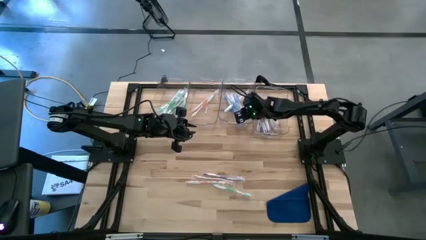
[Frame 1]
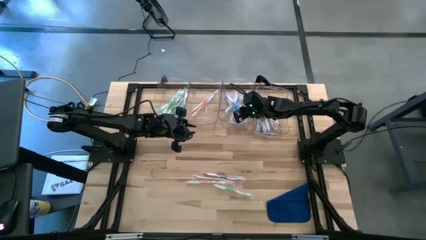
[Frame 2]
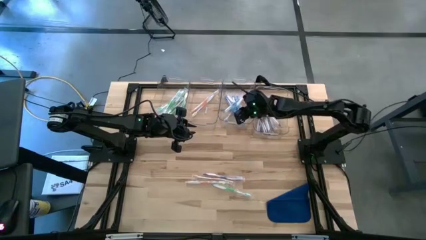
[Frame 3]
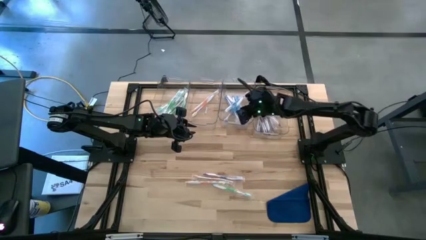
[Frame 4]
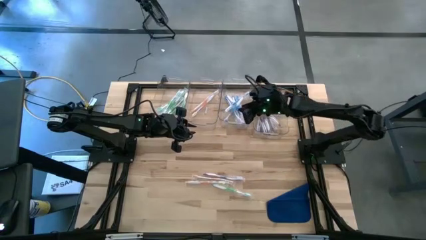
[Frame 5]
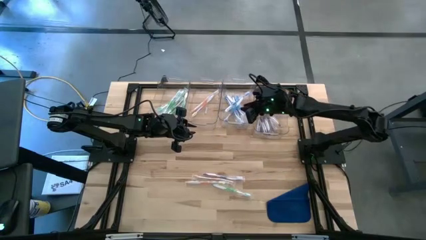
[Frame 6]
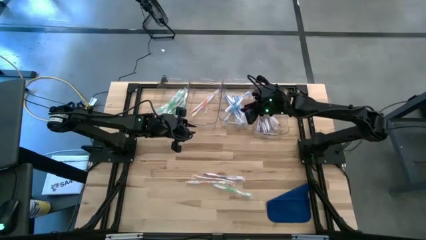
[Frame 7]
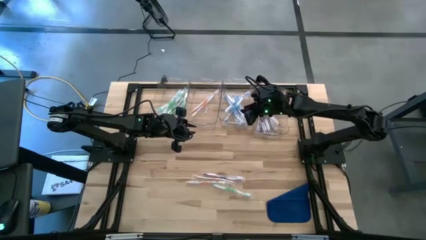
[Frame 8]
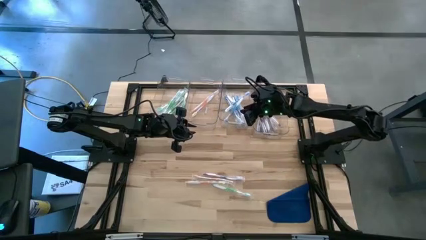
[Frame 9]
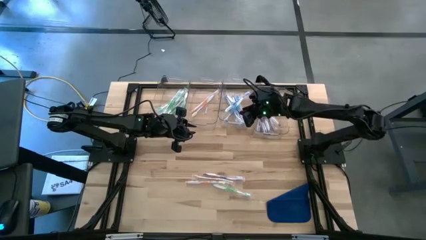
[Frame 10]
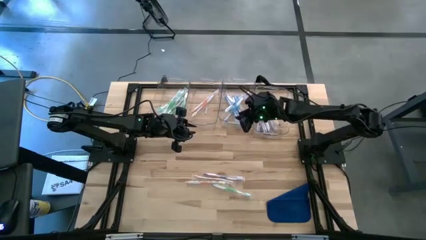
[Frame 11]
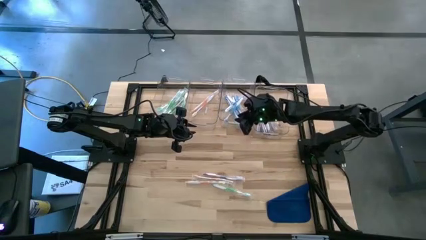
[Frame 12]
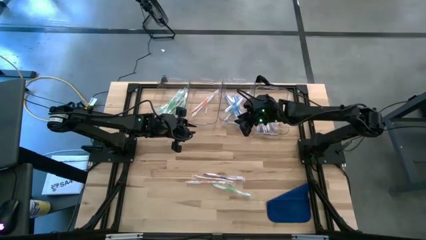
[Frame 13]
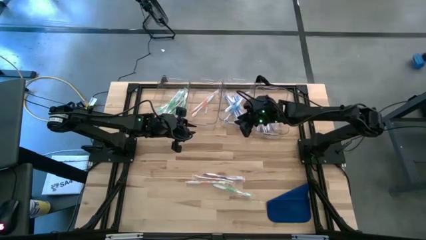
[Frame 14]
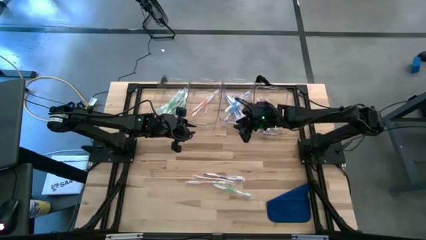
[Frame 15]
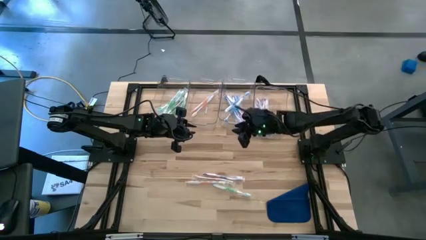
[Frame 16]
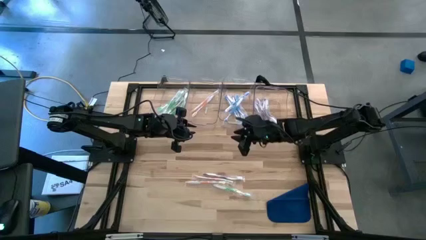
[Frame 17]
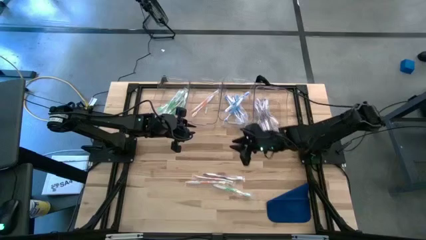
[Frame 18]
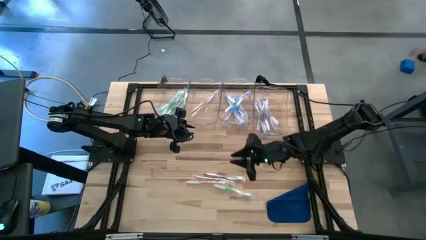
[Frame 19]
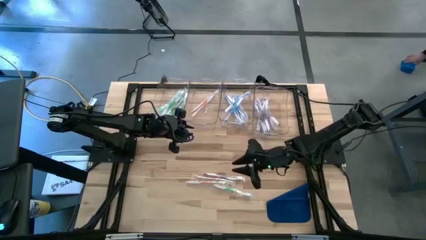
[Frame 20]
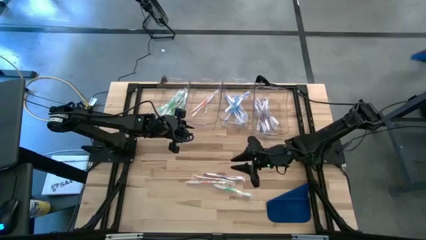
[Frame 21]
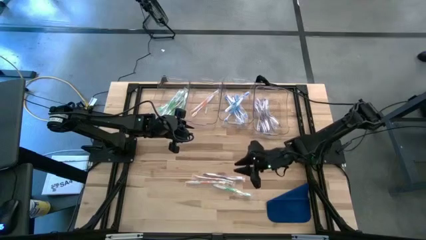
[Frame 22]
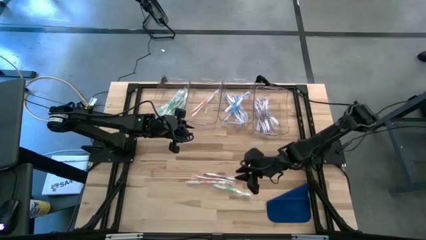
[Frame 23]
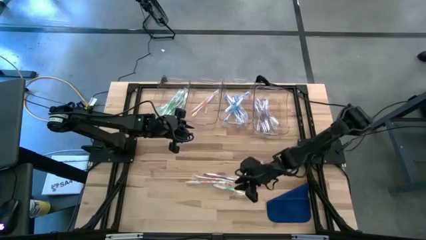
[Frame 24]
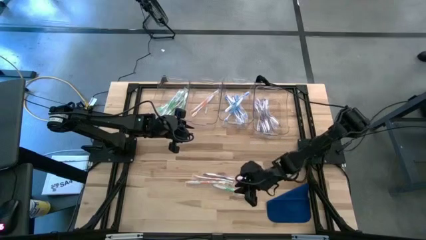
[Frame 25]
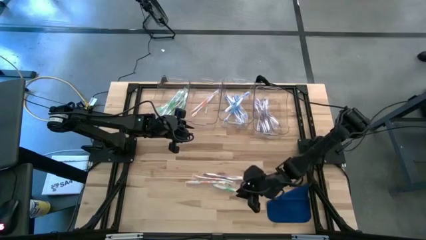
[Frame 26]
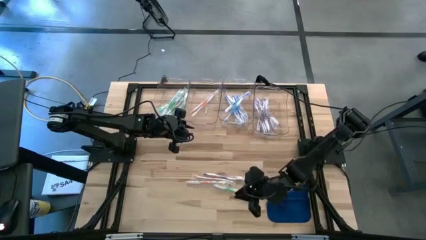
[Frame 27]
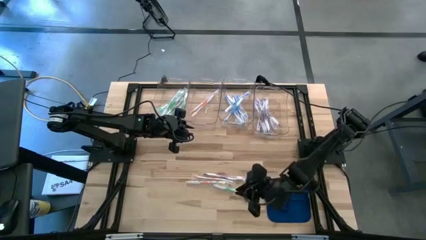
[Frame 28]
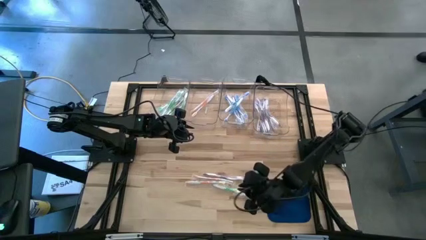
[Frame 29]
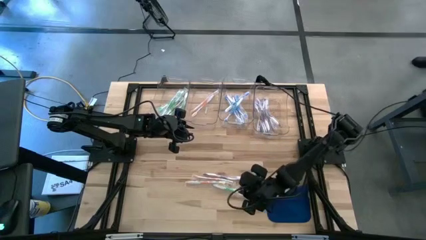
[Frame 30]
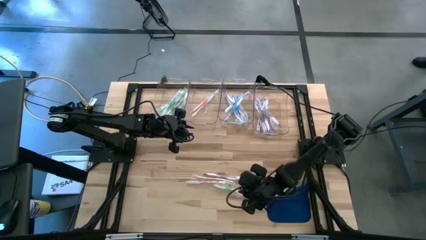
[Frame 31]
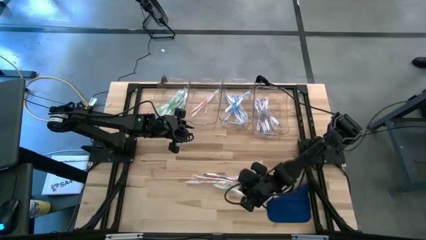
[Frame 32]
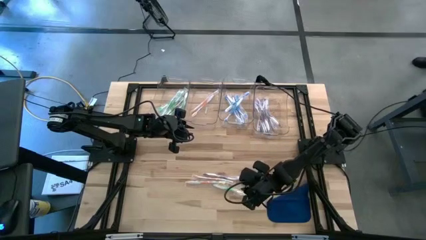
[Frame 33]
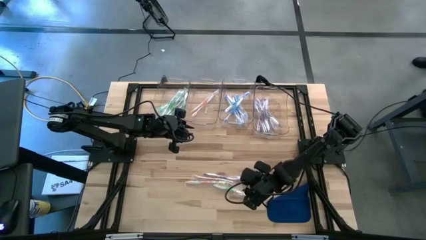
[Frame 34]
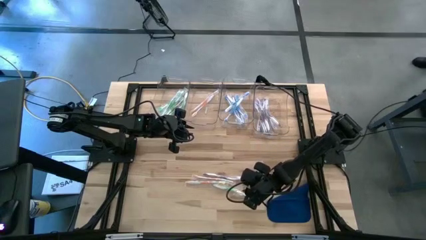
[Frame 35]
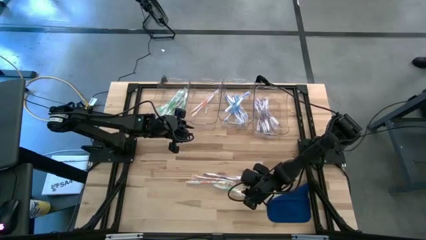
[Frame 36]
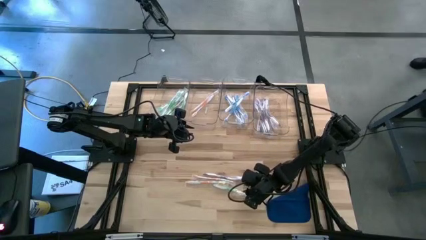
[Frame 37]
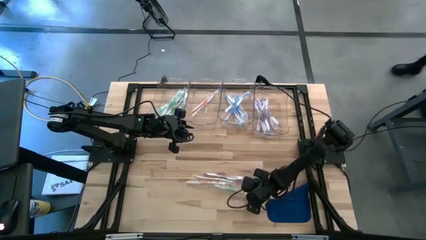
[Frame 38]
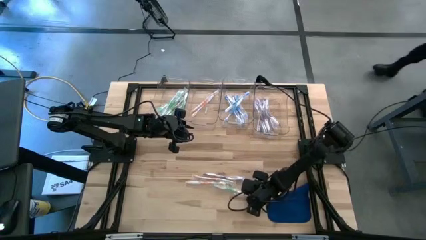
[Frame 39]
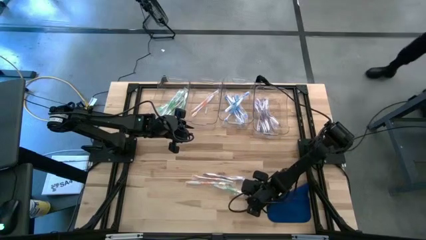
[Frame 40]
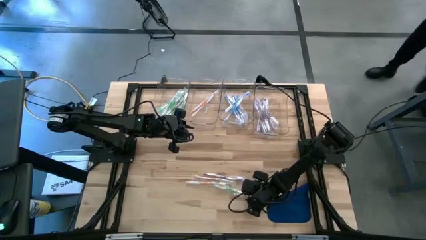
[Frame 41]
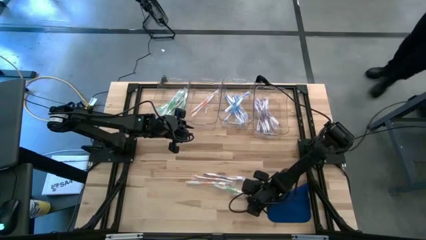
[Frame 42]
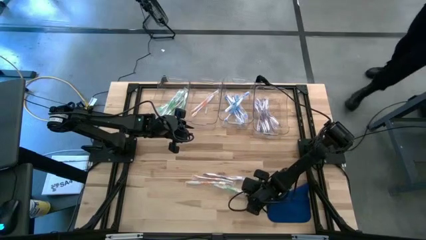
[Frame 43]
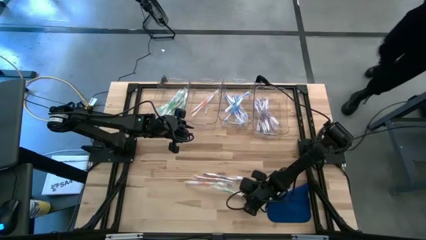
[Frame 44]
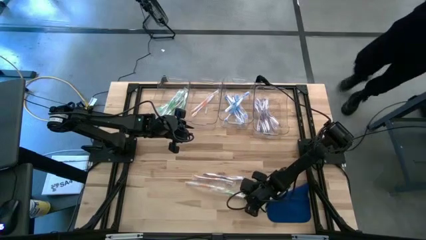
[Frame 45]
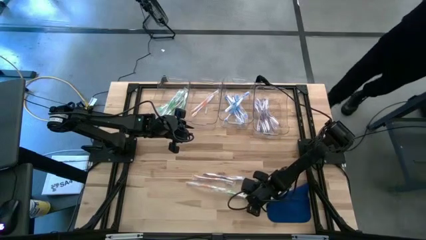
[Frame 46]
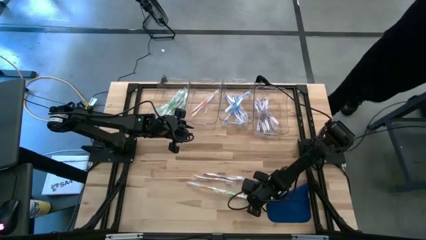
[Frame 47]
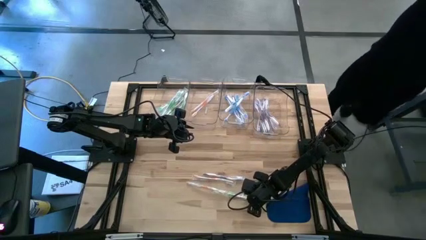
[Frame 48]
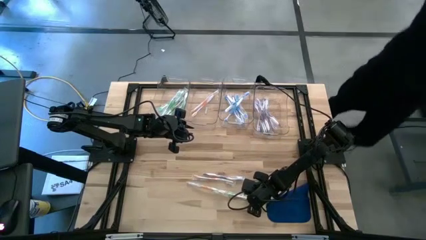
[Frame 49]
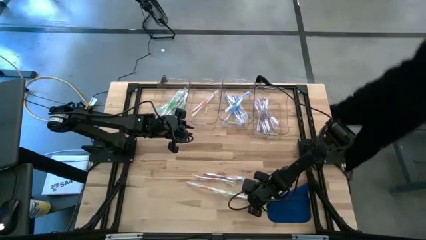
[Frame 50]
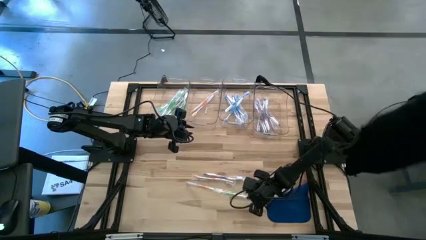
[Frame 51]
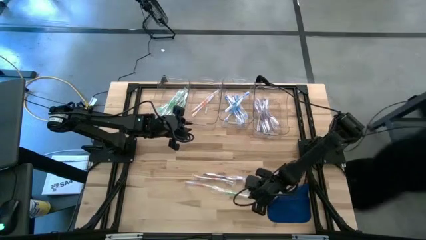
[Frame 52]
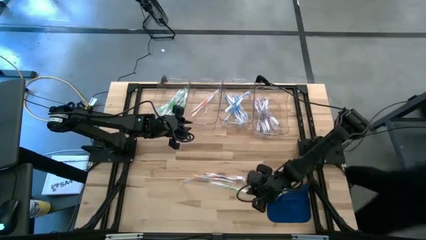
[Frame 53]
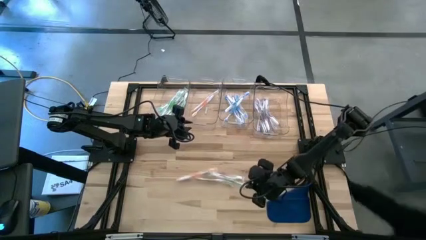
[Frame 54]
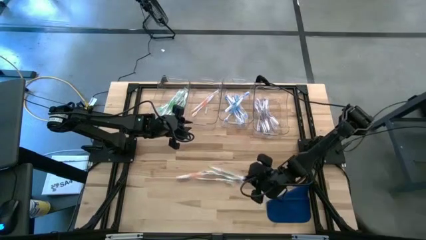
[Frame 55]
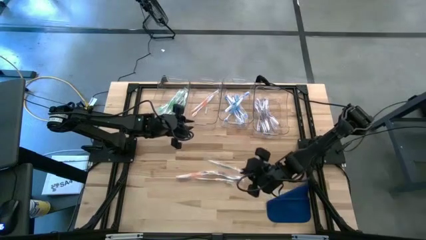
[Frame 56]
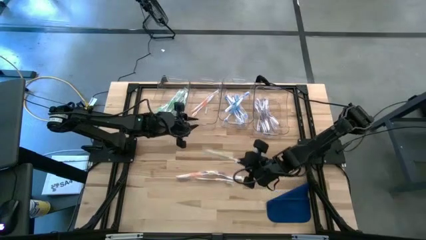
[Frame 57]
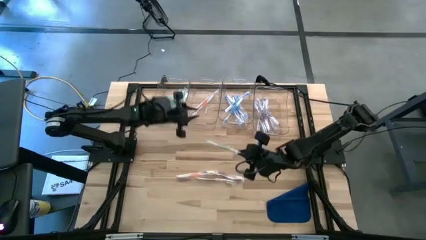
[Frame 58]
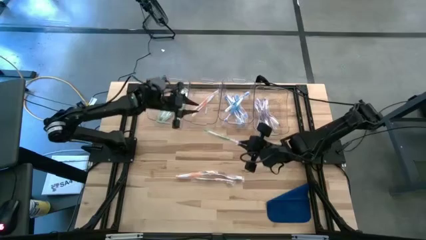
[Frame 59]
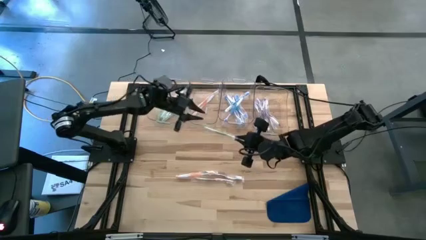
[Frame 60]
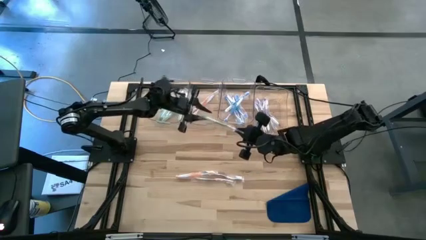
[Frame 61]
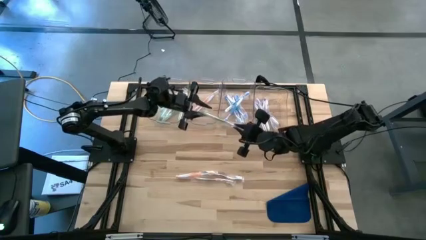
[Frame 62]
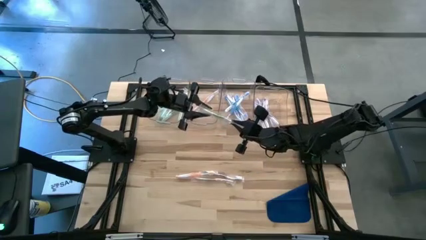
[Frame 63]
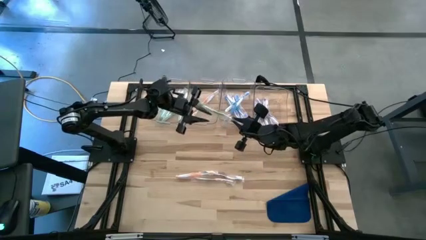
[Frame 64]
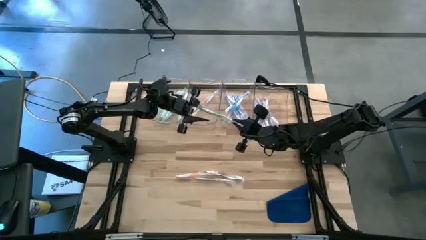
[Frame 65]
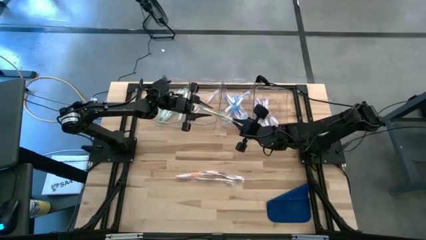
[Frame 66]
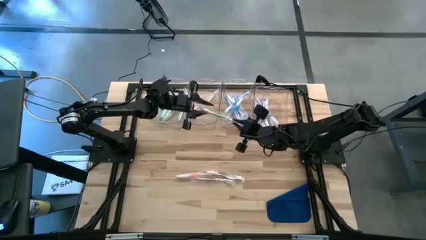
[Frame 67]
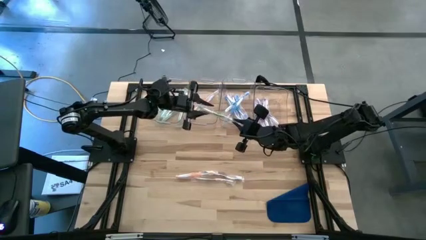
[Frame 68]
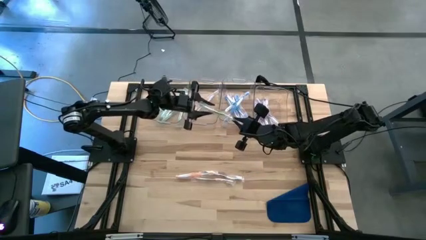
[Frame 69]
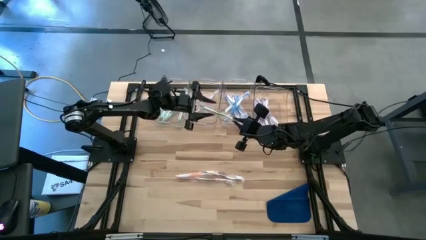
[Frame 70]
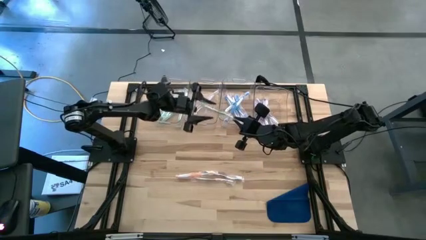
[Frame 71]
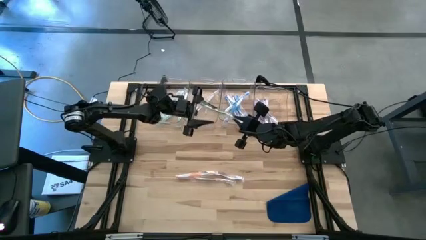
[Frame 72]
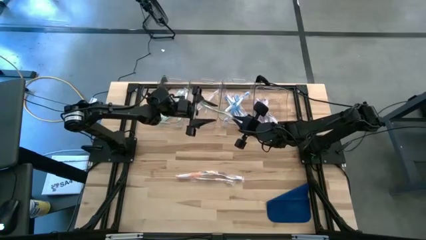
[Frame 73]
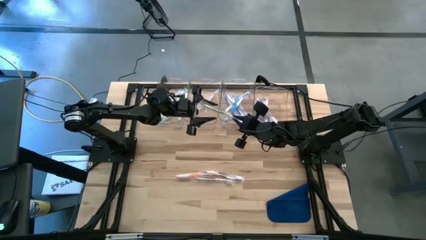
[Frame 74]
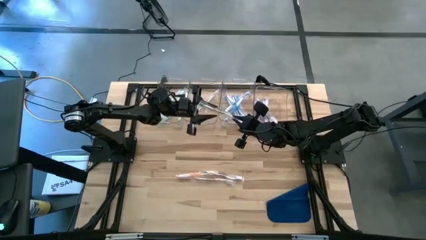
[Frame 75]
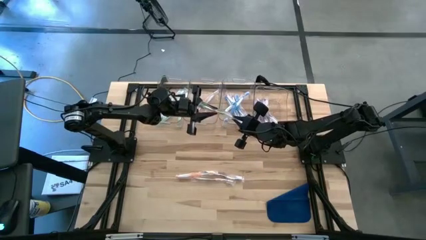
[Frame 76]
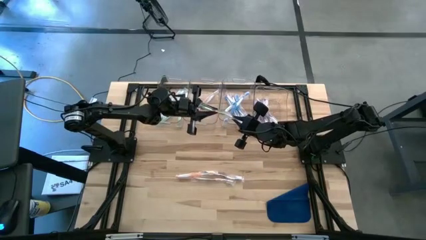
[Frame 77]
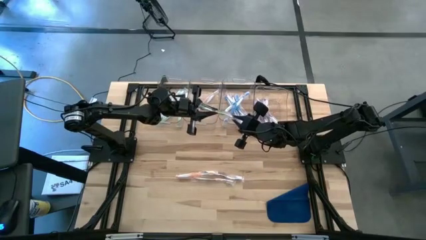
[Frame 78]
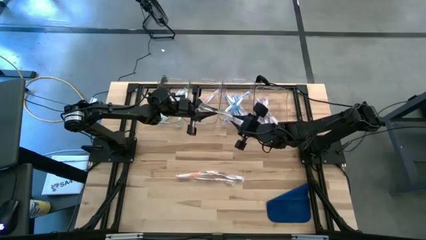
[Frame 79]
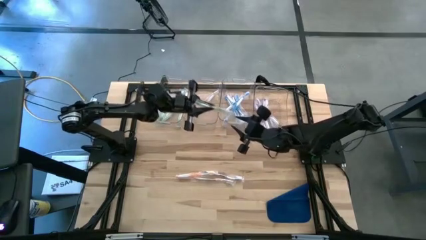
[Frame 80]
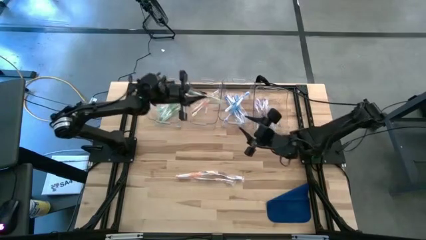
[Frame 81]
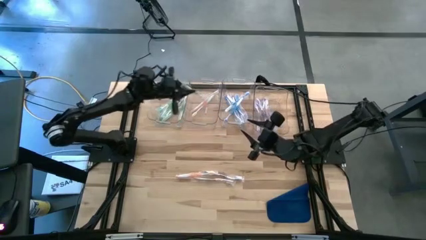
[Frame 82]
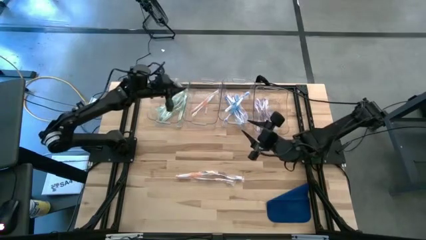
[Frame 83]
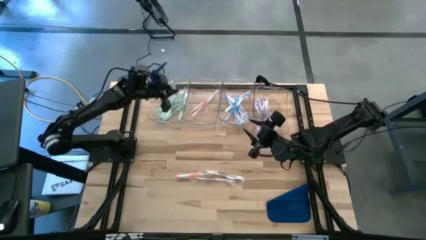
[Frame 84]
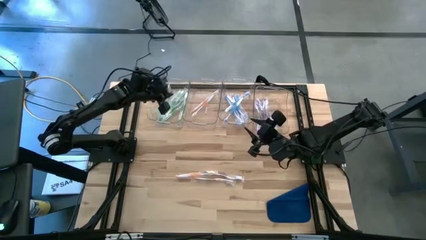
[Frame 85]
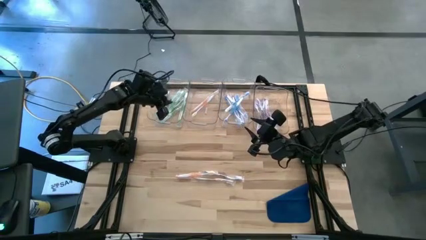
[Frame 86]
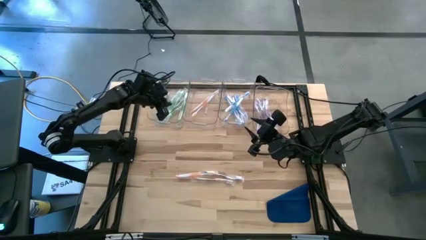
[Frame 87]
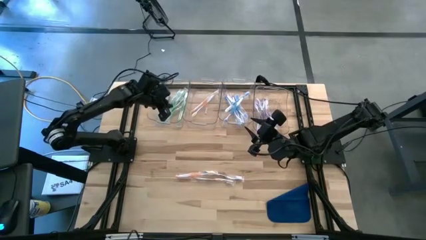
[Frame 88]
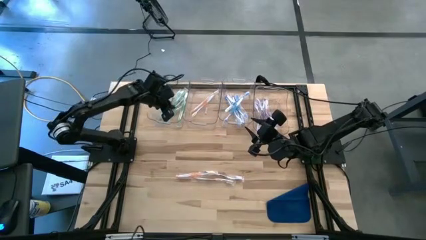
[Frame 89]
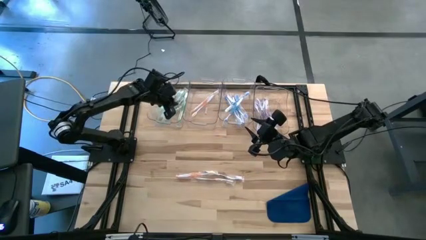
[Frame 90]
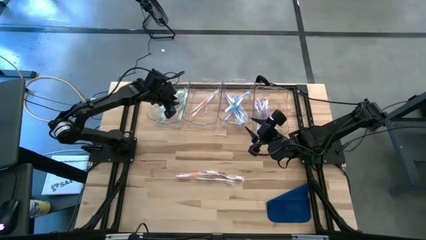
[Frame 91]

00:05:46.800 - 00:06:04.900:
Task: Pick & Place Toothbrushes
Put the green toothbrush into the left transparent bin
